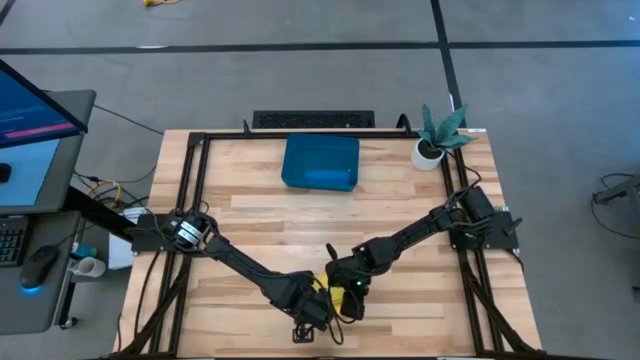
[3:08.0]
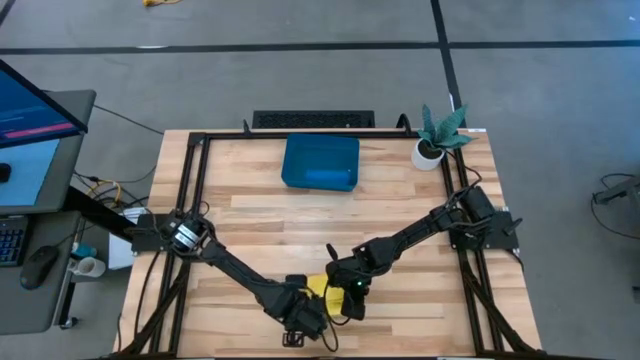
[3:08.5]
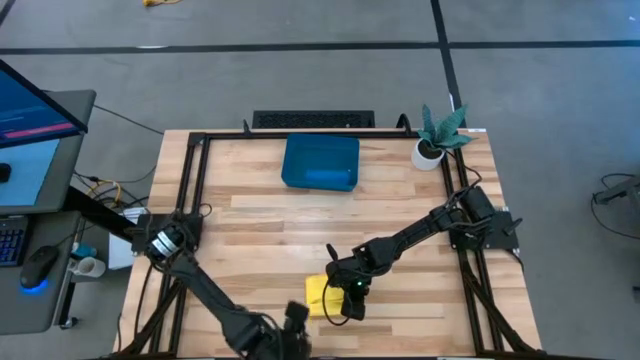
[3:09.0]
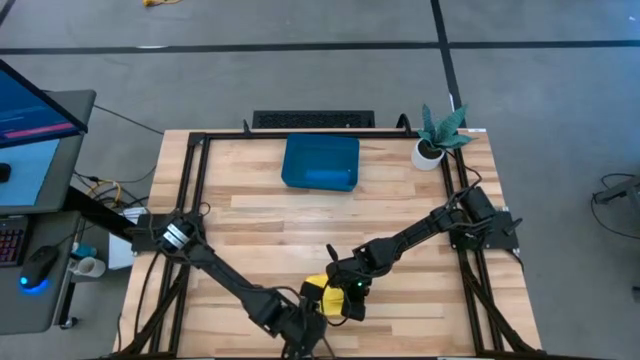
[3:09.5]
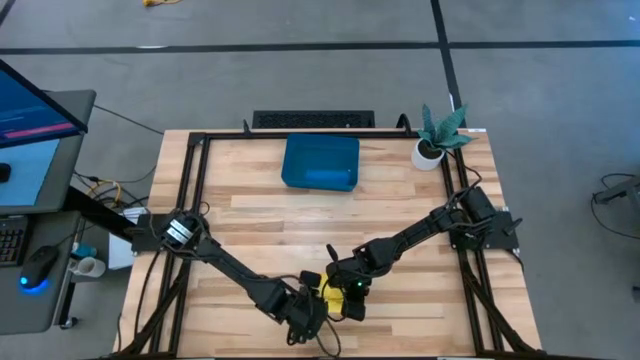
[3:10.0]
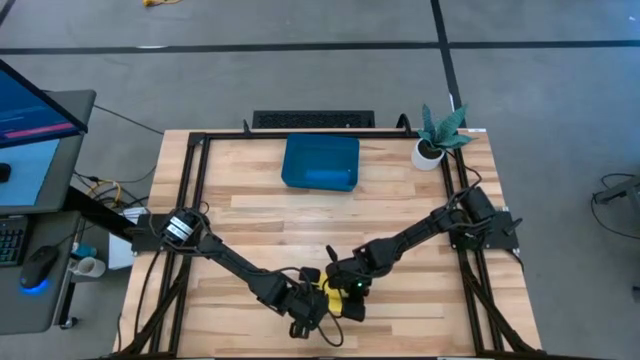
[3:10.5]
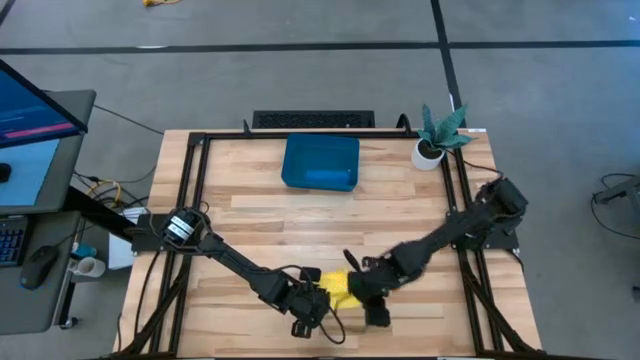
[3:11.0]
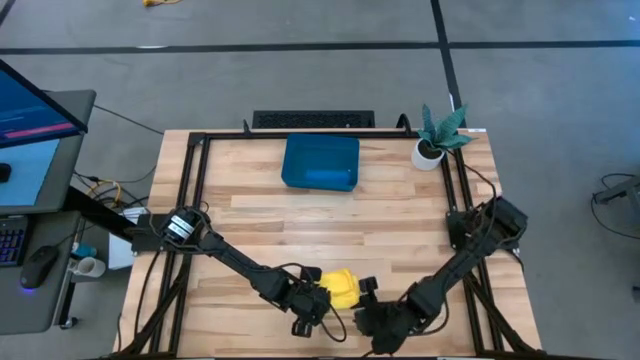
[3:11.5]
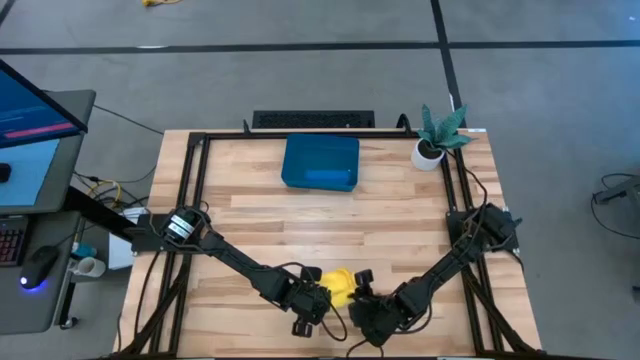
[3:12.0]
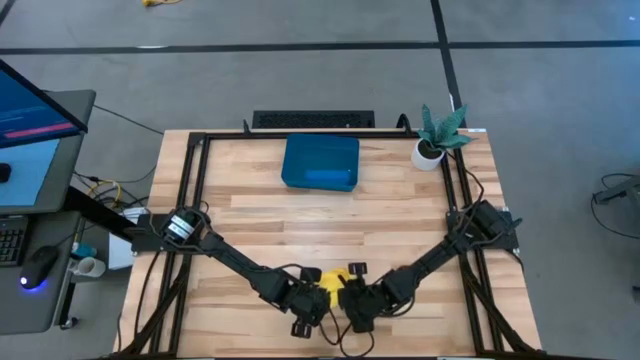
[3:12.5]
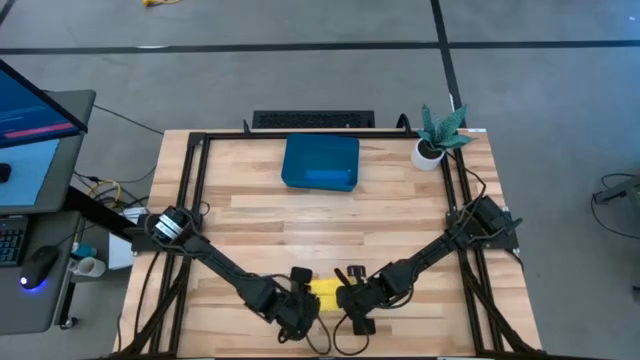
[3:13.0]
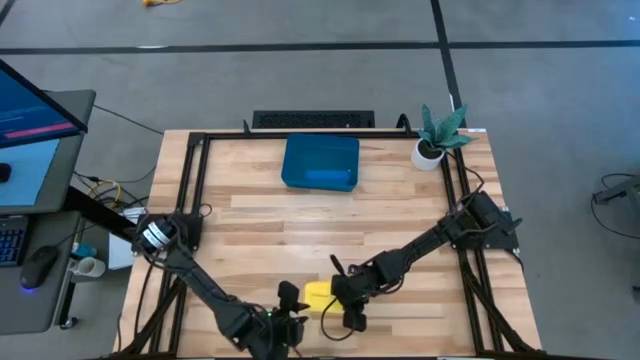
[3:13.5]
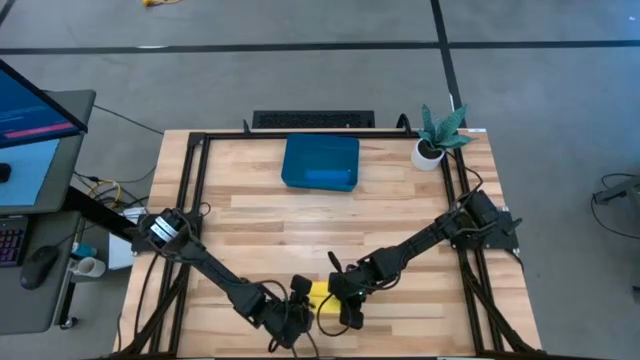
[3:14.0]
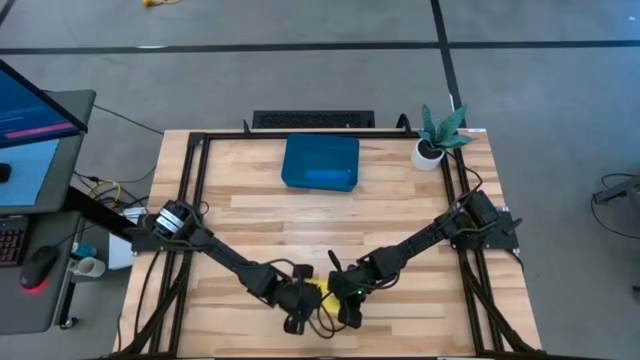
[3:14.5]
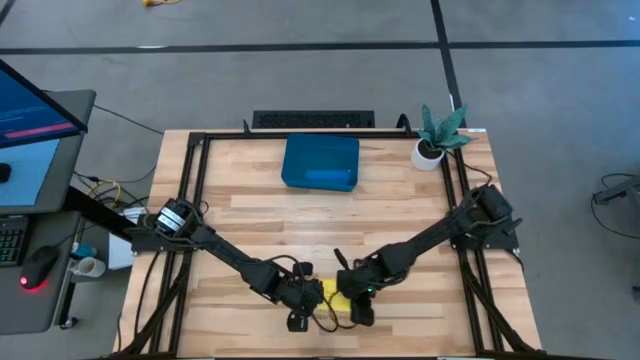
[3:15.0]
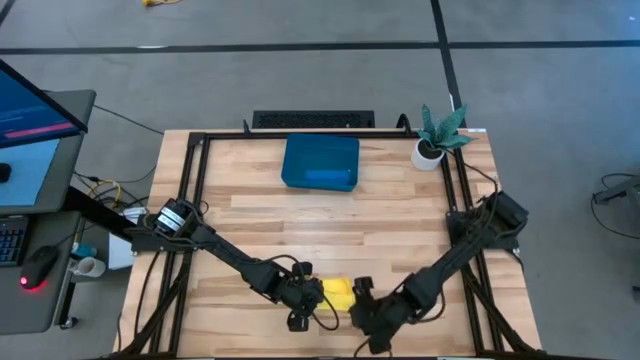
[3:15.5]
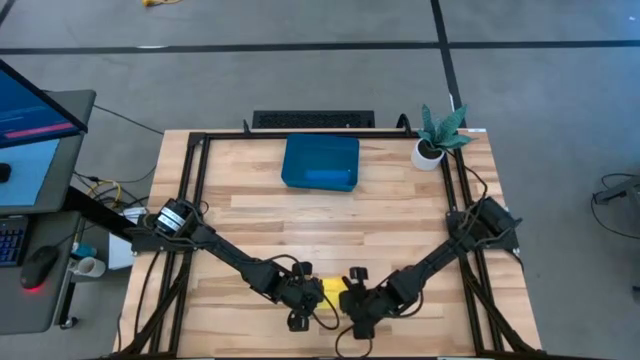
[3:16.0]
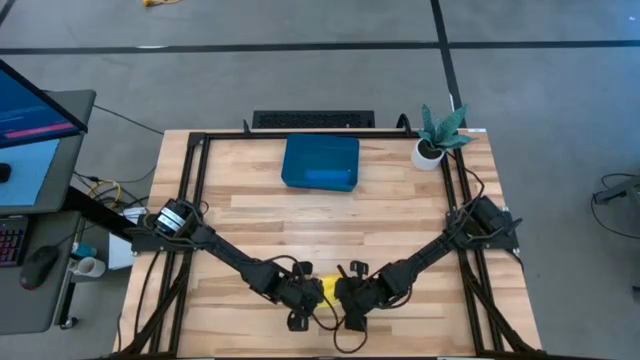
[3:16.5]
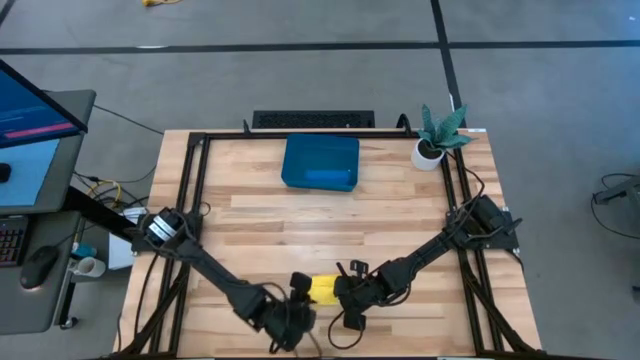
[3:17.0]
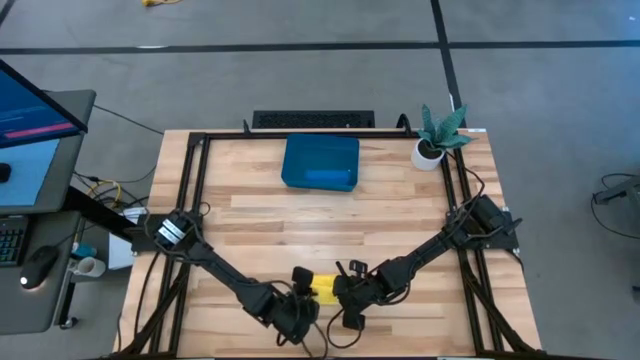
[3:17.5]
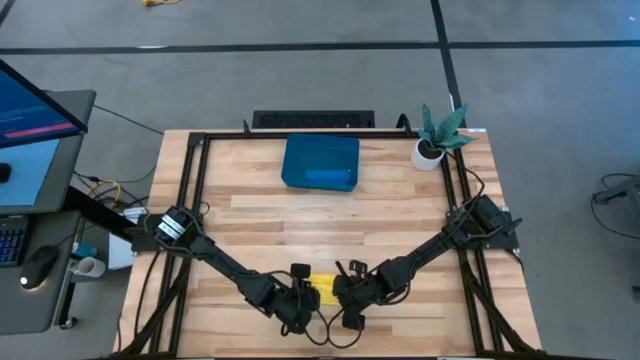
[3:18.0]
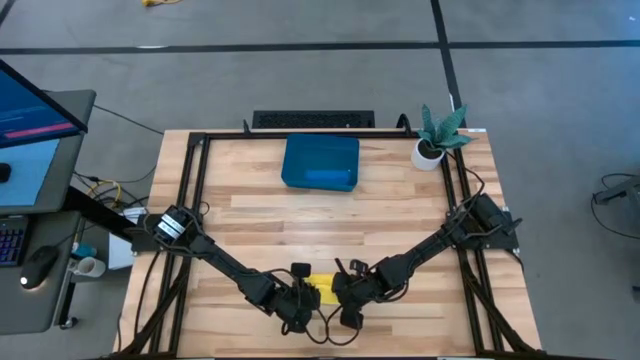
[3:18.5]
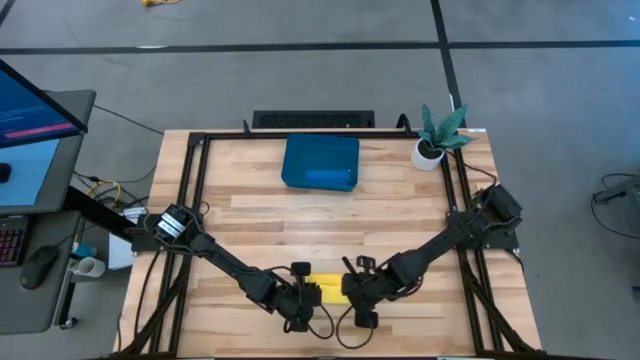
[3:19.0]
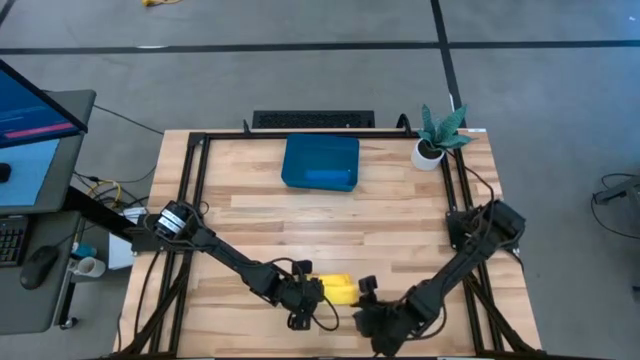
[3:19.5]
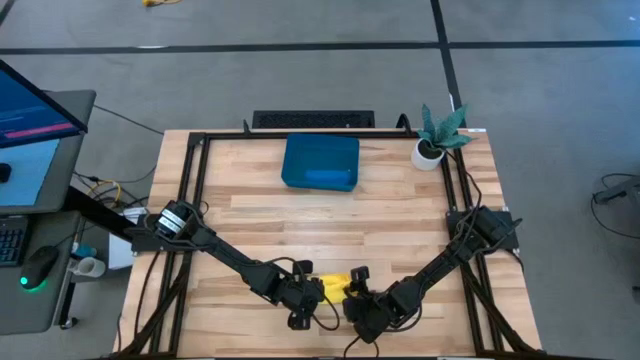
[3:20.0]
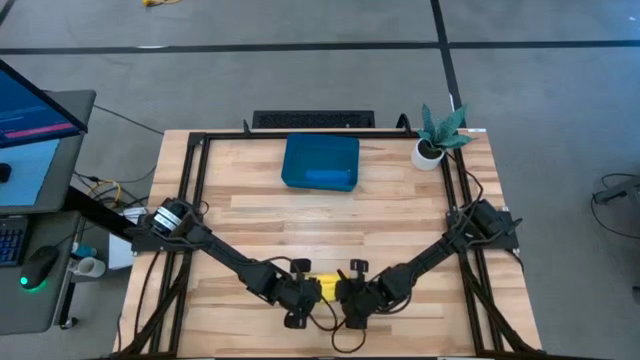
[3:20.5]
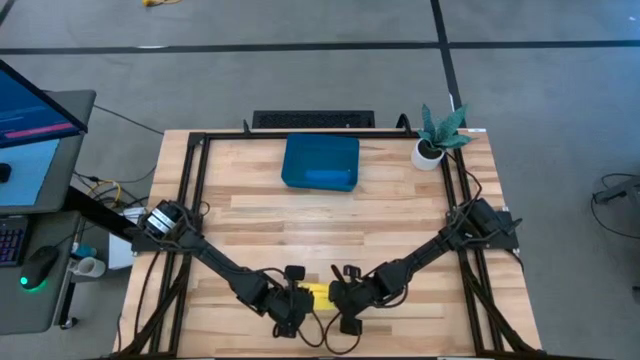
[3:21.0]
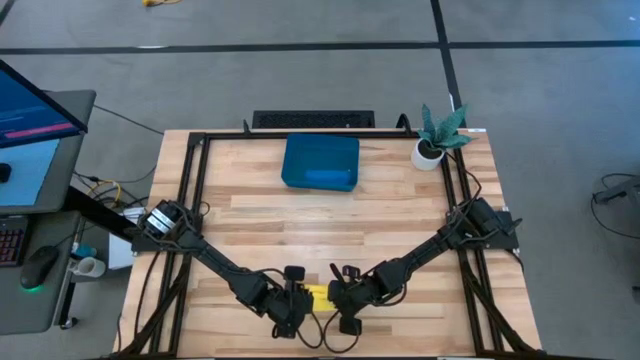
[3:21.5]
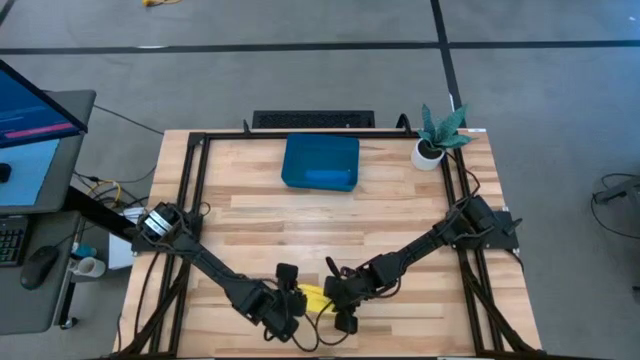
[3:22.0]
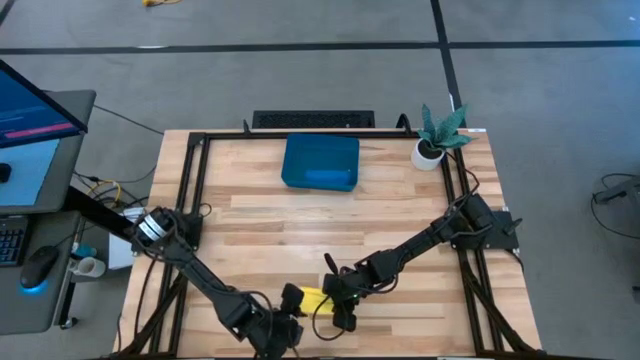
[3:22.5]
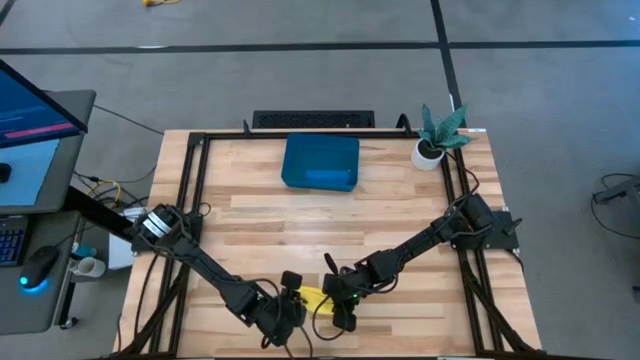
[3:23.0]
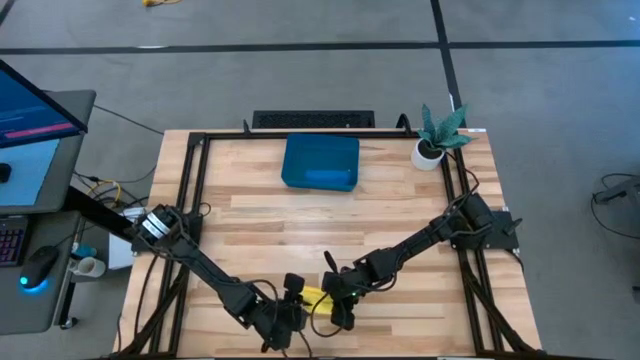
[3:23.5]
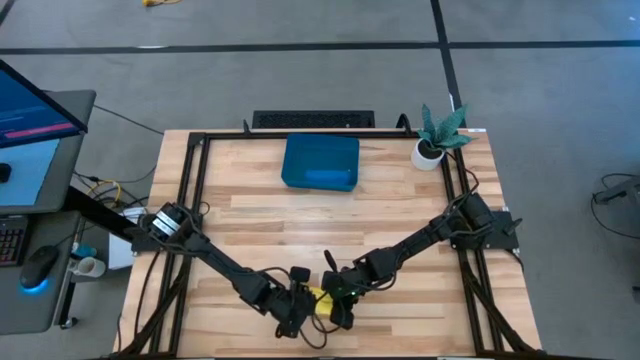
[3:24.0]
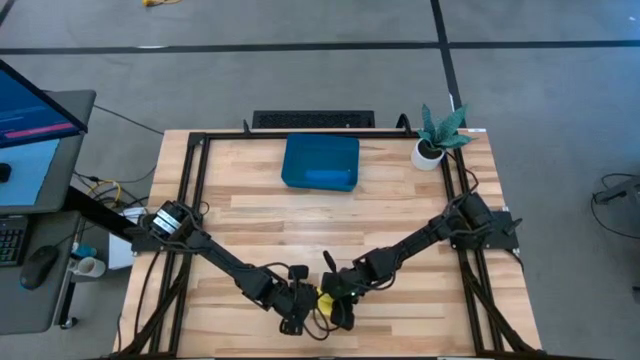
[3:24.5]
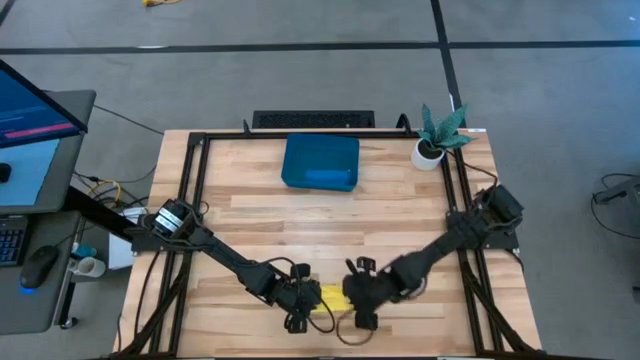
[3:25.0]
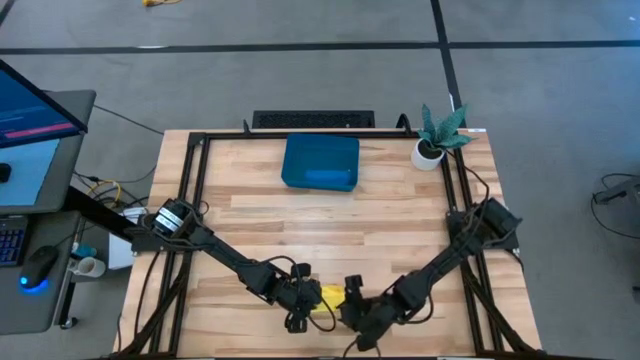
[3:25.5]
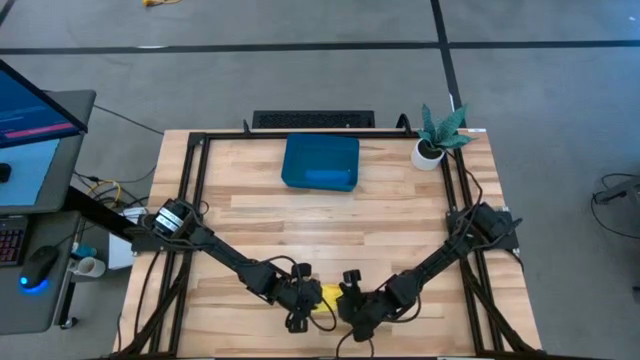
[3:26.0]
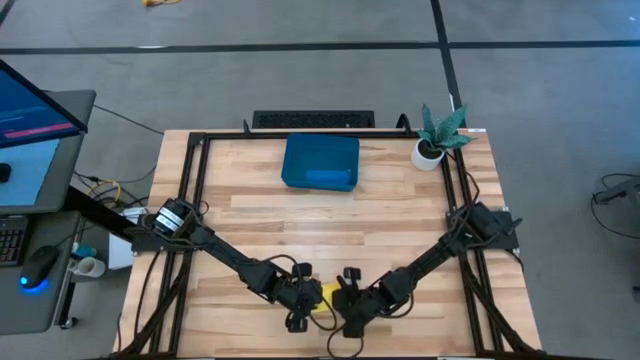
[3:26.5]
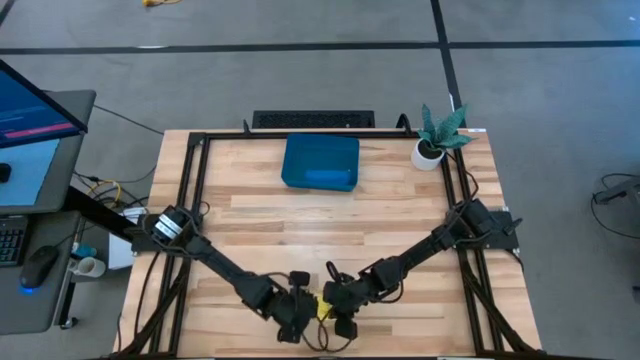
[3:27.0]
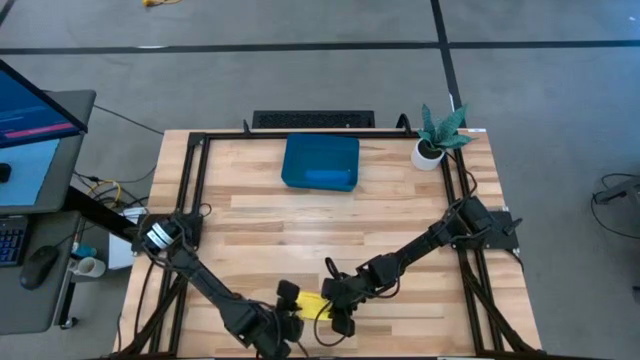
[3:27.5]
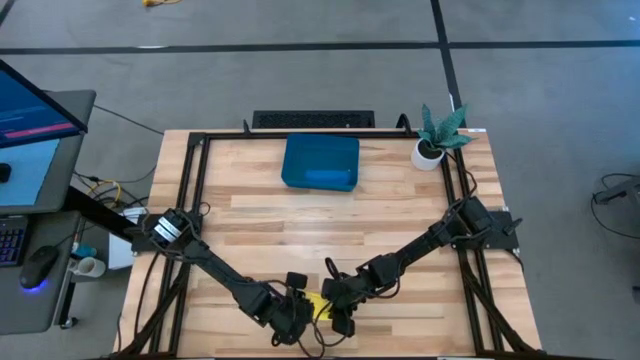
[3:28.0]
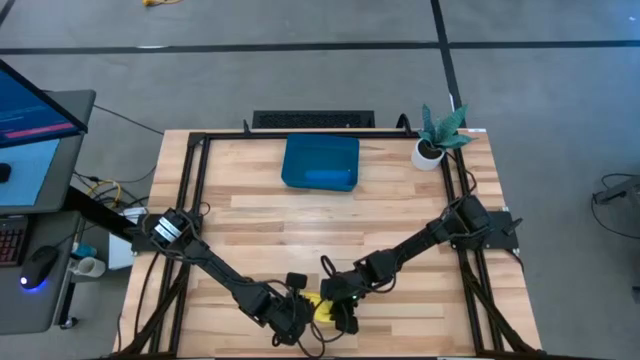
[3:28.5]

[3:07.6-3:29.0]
Task: Roll microfiber towels into tight, uniform cylinder then place into a basket
Roll the yellow microfiber cloth
